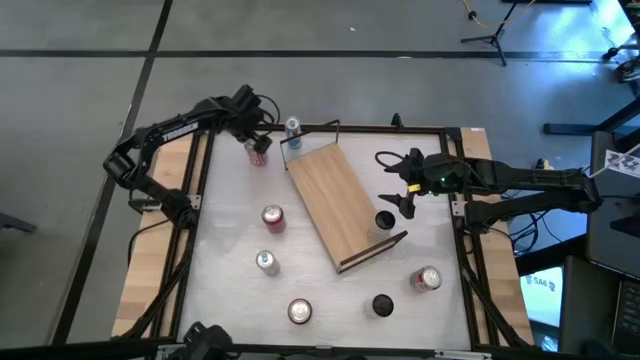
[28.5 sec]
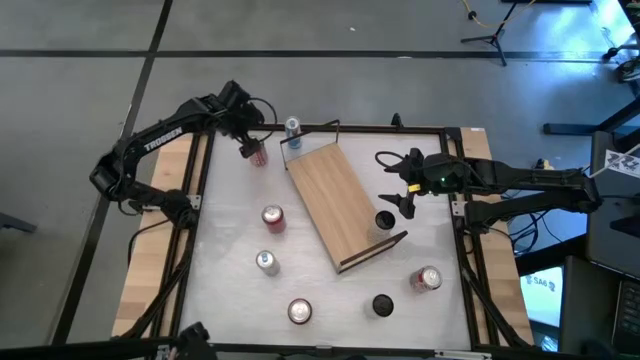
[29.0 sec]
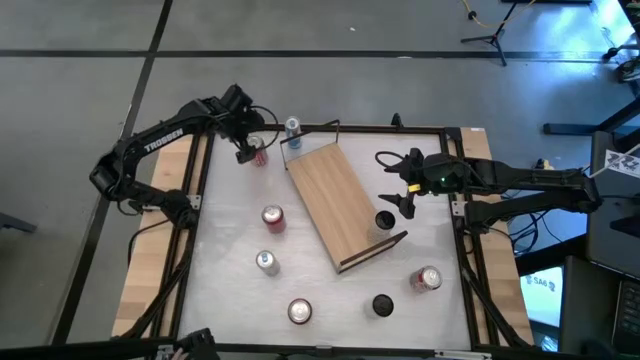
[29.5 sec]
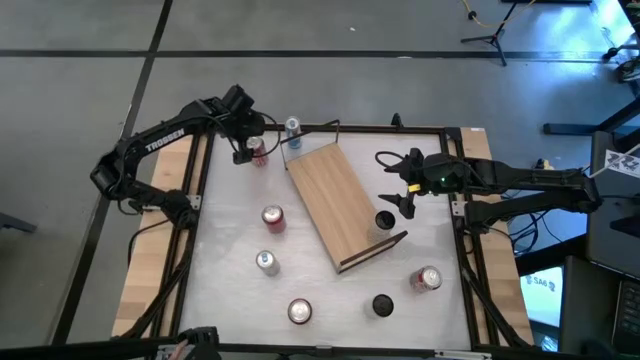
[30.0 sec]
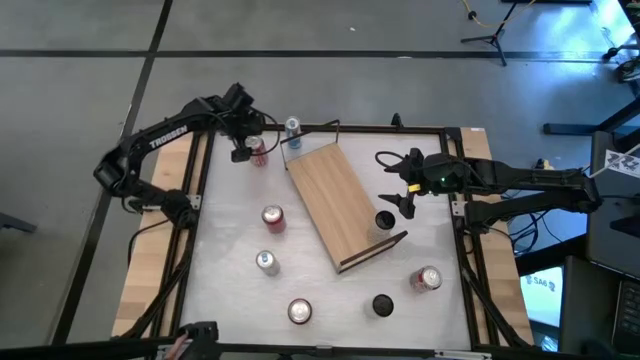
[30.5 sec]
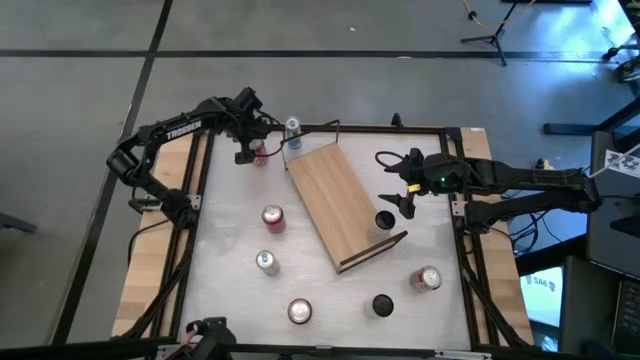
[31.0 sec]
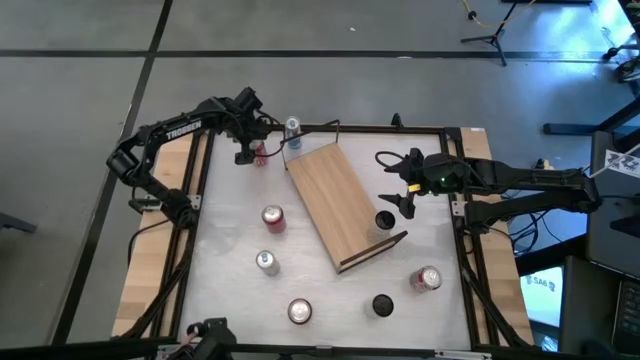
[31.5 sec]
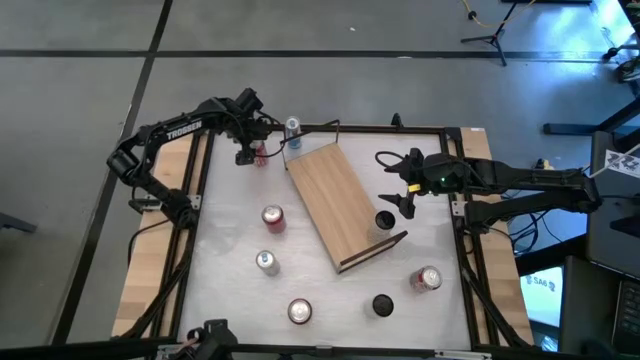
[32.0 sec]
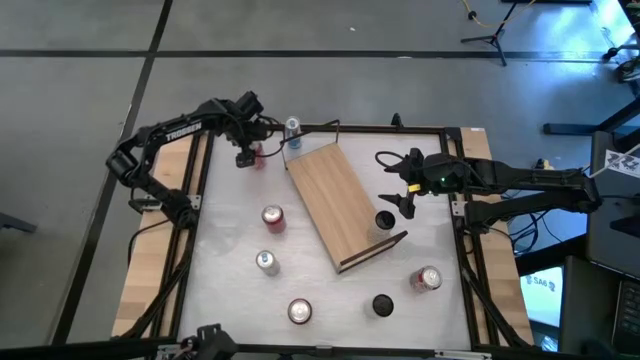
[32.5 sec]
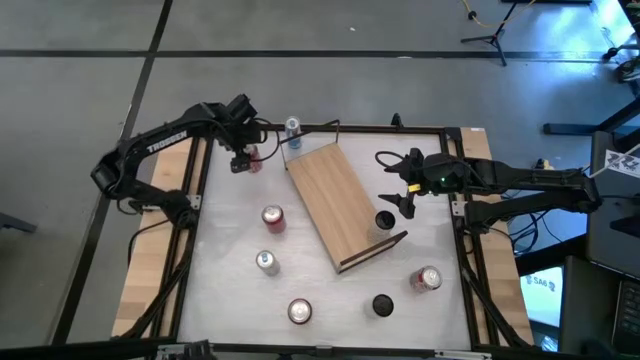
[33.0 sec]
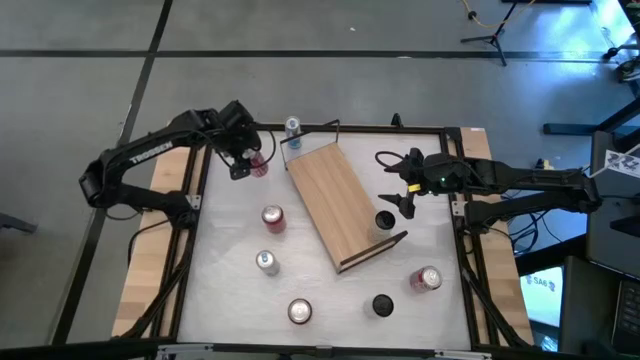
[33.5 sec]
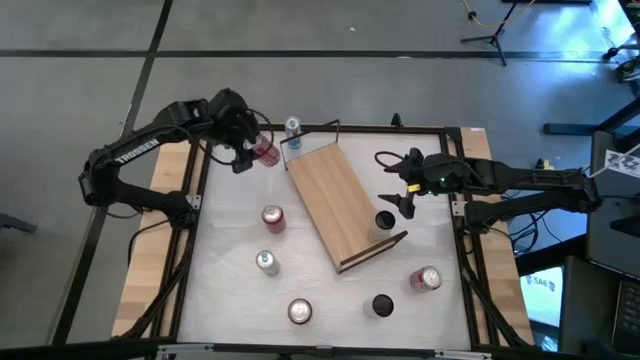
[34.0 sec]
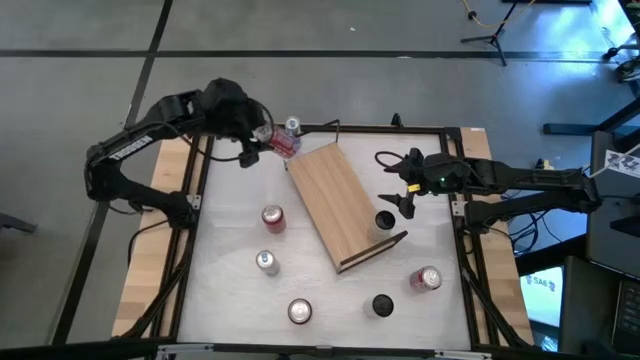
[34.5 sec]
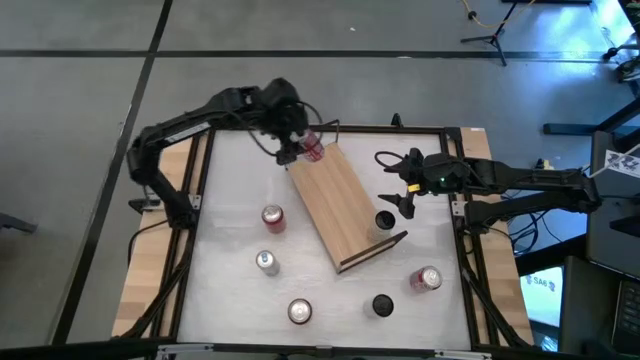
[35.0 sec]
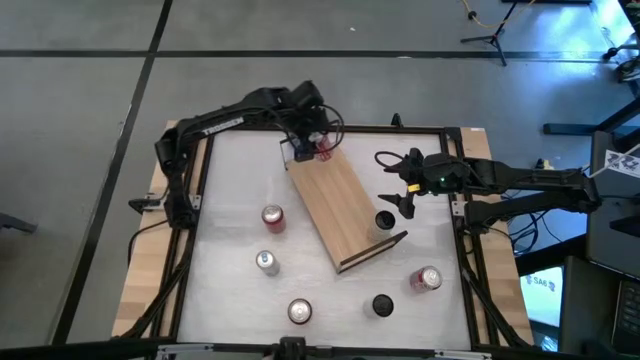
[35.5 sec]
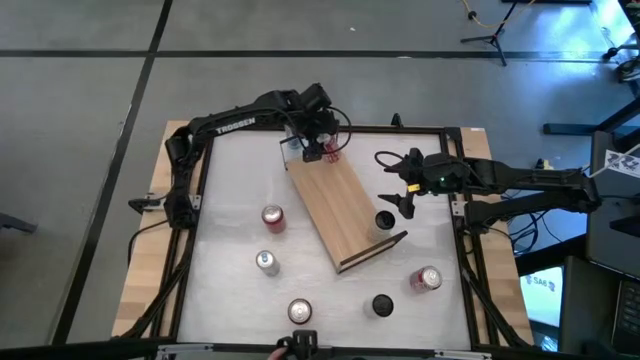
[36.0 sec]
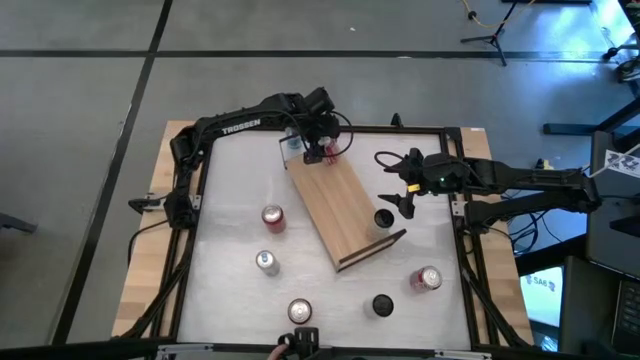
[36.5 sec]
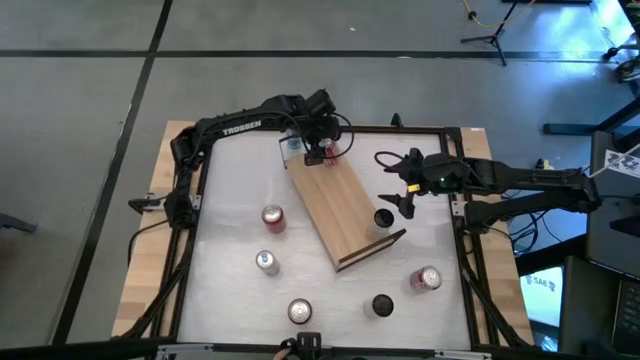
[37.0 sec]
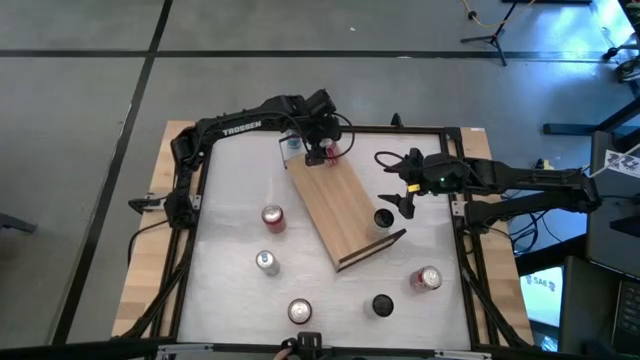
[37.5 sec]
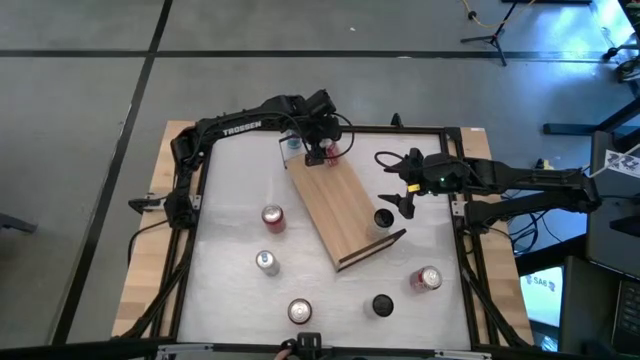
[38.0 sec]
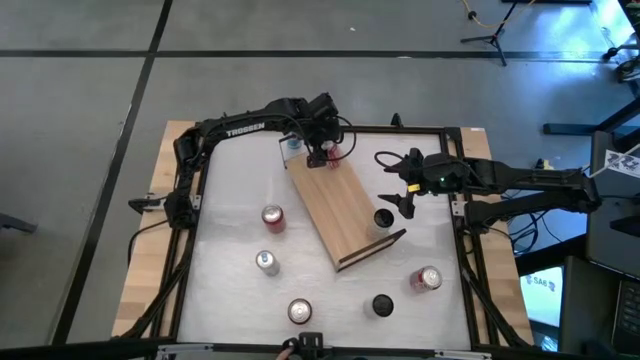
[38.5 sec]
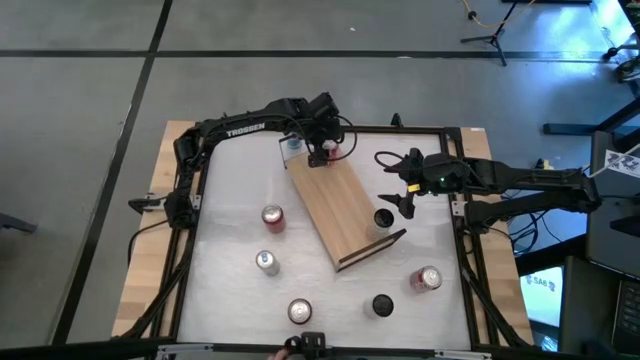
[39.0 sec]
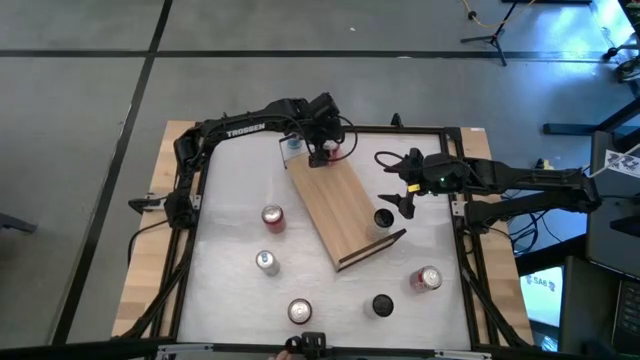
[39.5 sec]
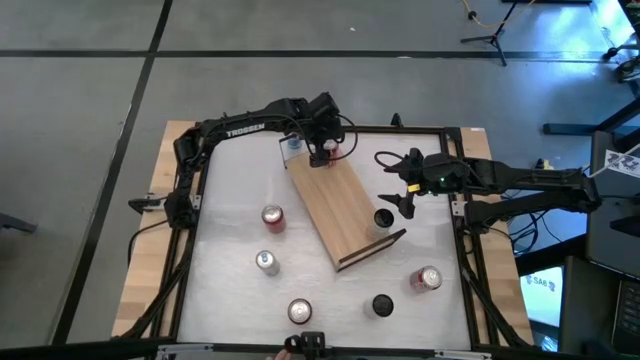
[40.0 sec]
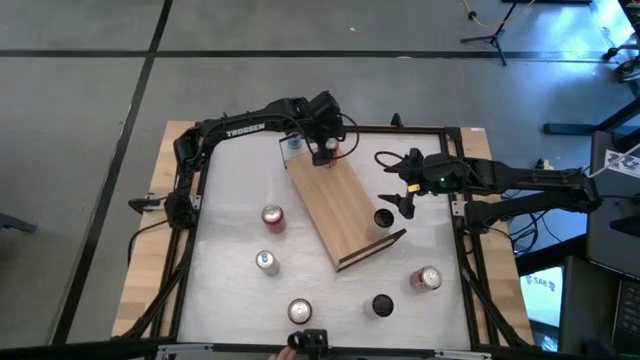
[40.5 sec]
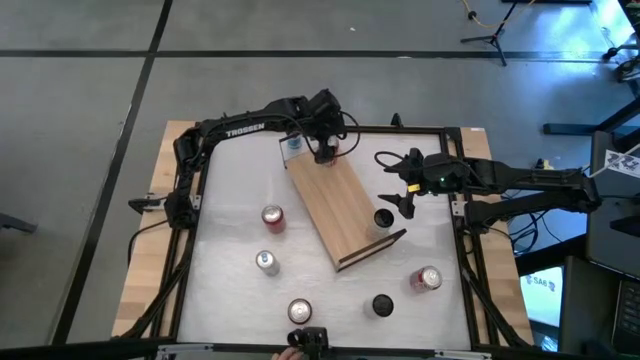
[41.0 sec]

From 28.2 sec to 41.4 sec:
Task: Place canned beverage on shelf
Put the top red white soda can on the shelf

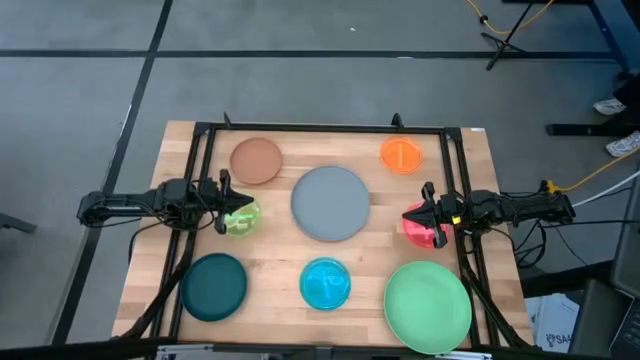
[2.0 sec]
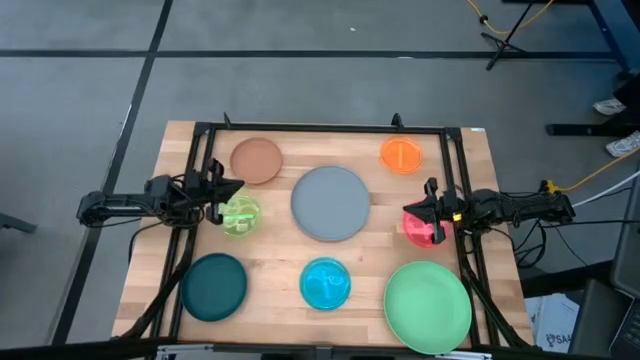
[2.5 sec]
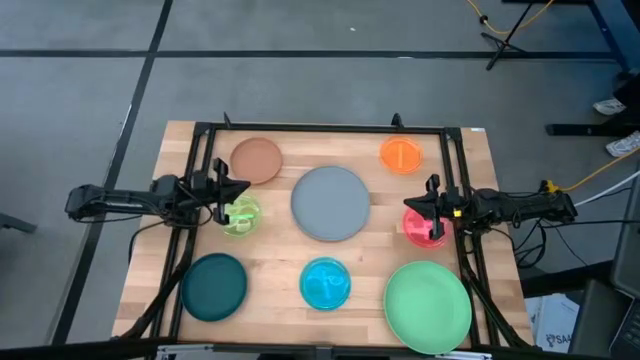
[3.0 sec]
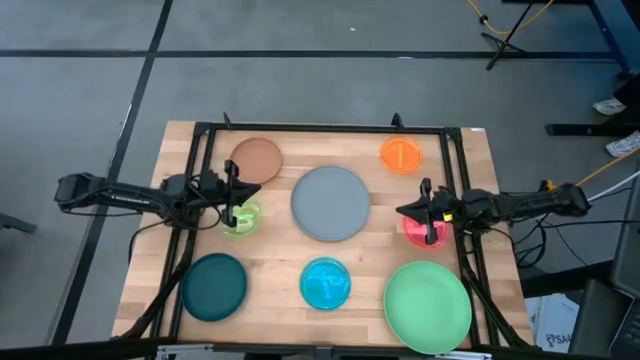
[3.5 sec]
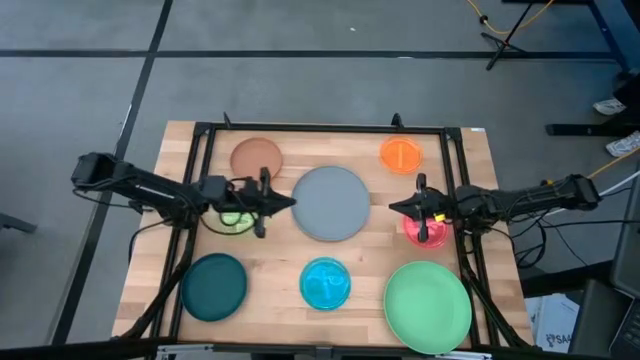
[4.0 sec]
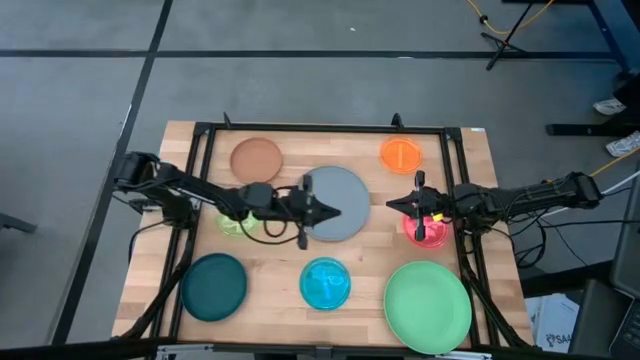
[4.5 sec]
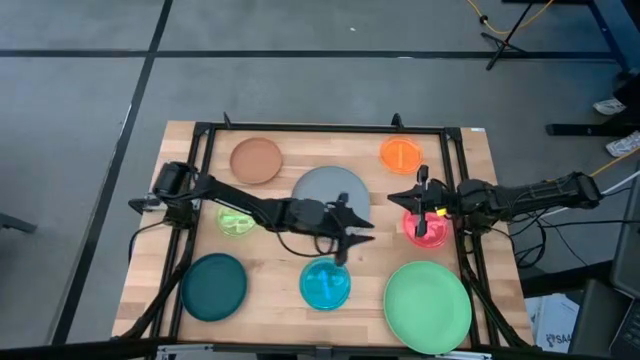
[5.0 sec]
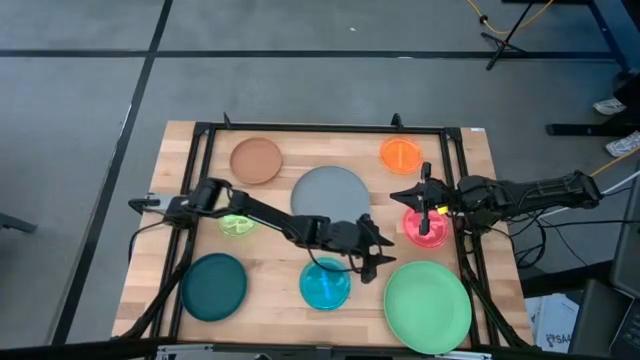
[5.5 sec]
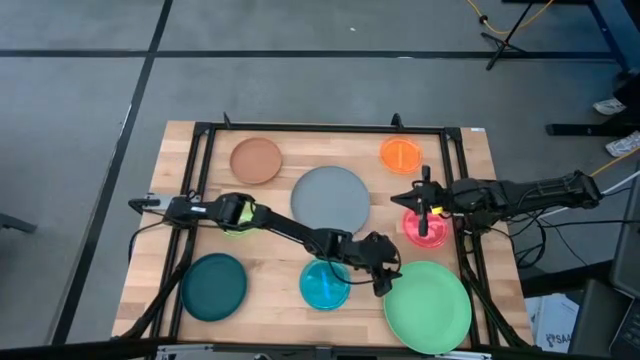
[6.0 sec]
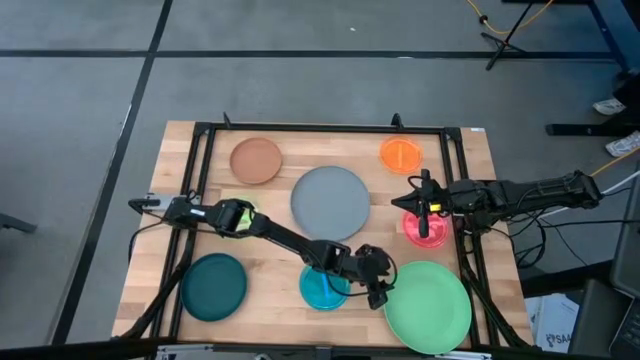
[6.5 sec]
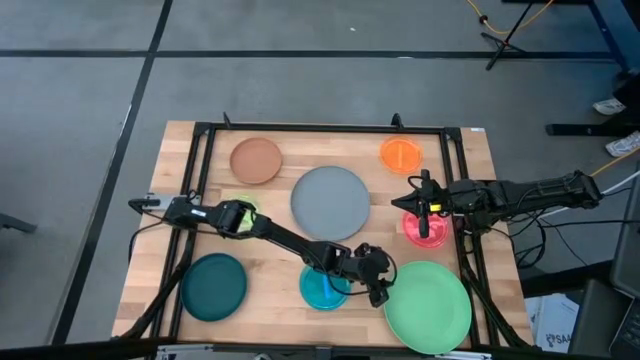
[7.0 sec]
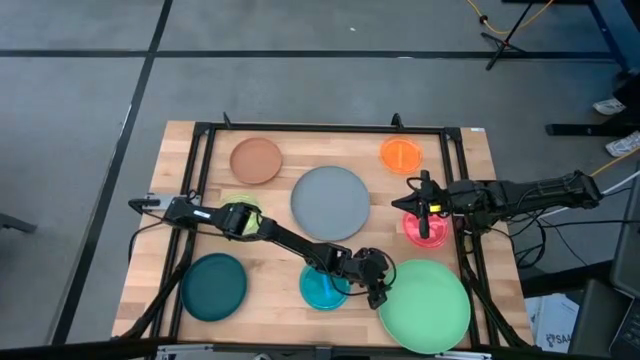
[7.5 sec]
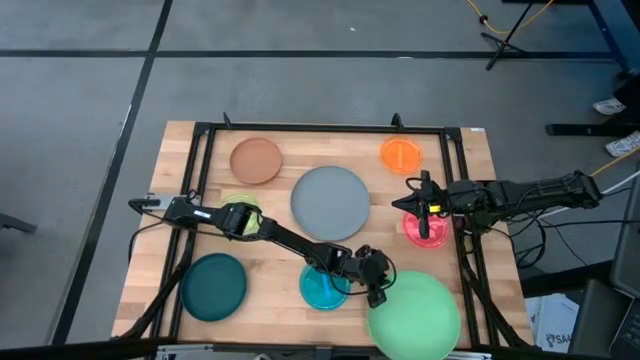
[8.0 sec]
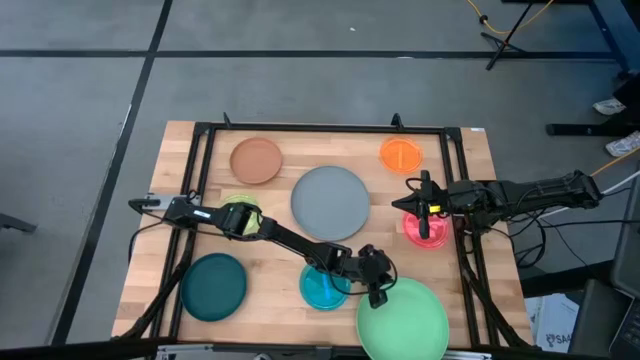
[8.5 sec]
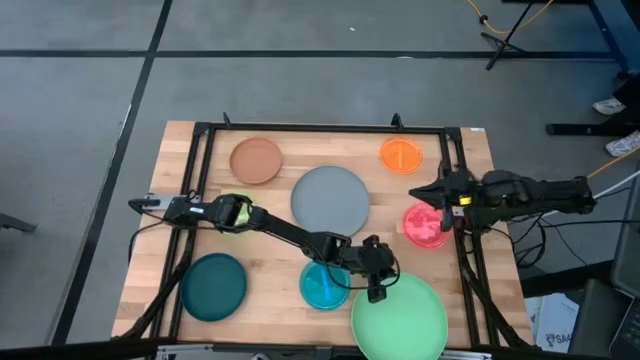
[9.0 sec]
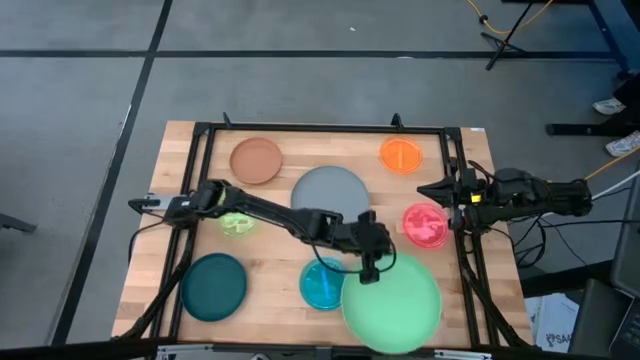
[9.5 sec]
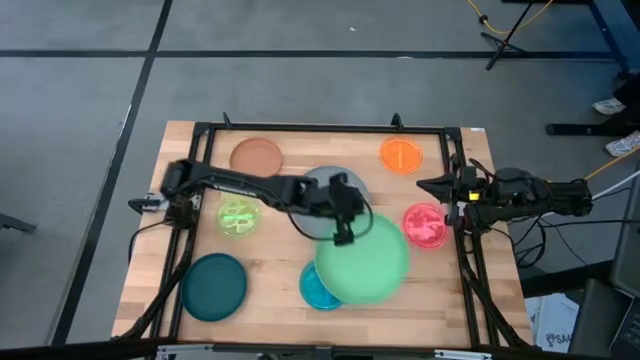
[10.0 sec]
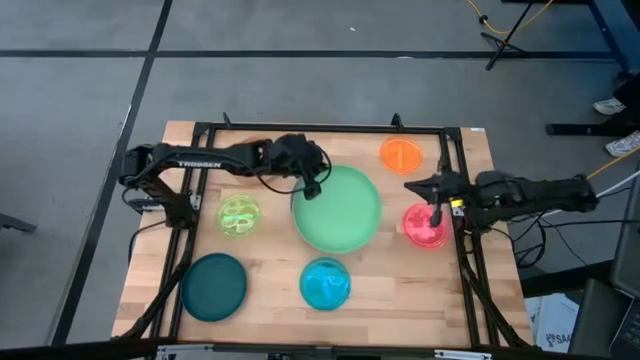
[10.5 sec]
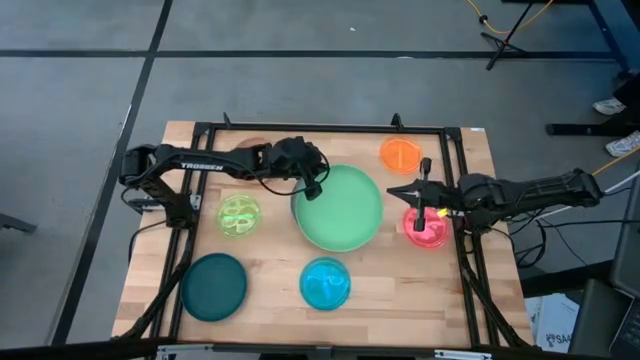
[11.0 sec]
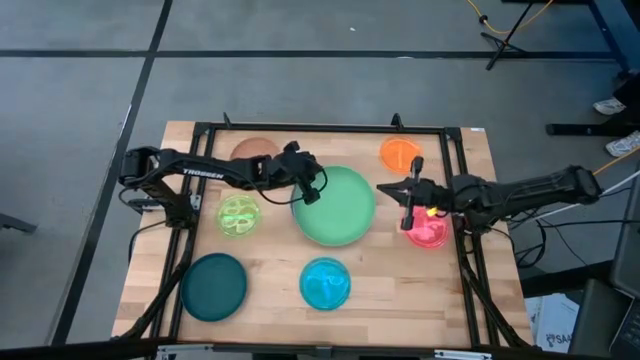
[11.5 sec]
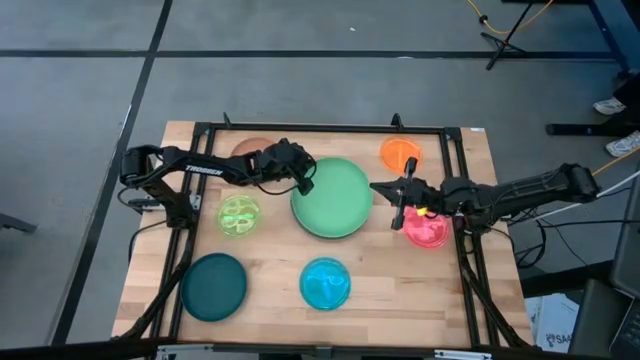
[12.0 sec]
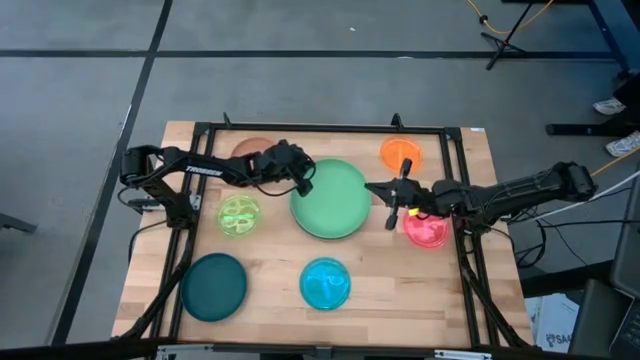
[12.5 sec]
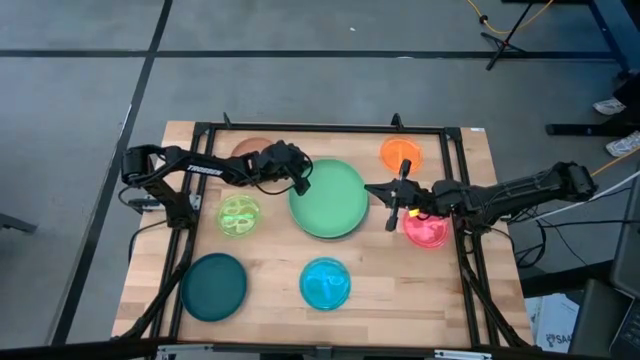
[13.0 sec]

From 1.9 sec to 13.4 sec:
Task: Stack plastic plates
Stack the green plate on top of the gray plate
